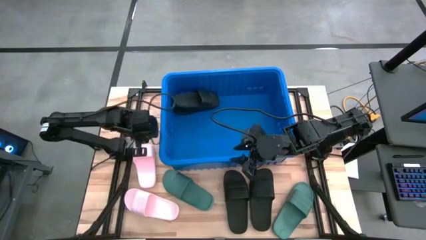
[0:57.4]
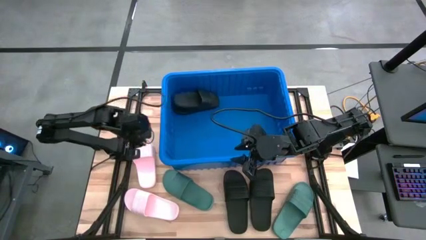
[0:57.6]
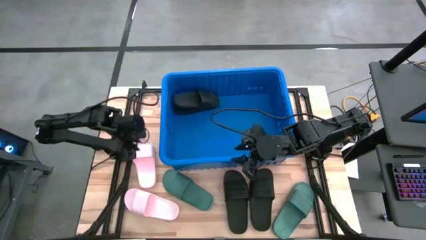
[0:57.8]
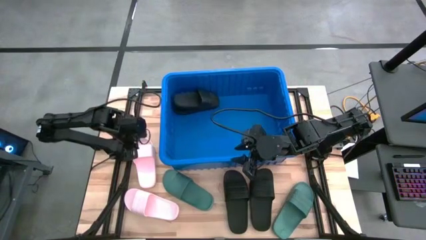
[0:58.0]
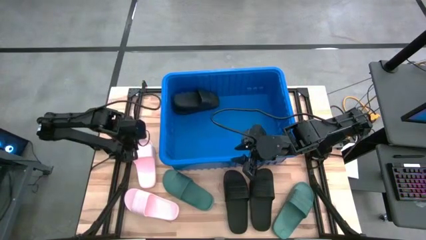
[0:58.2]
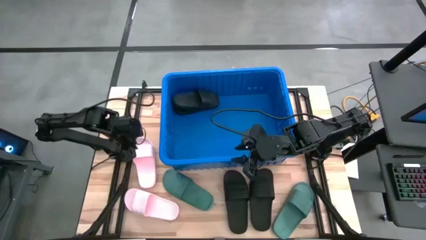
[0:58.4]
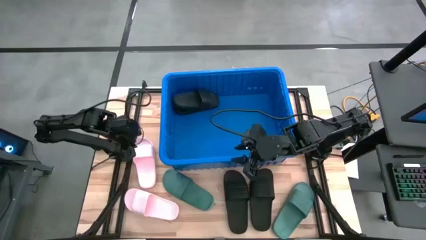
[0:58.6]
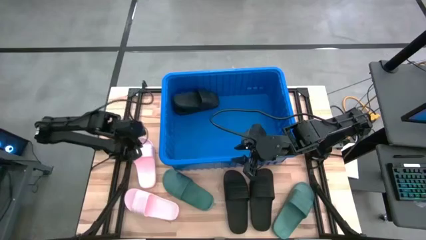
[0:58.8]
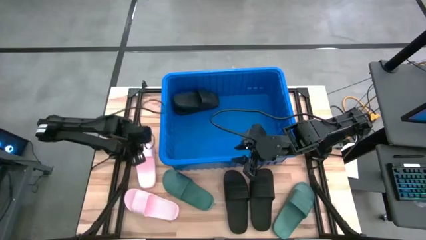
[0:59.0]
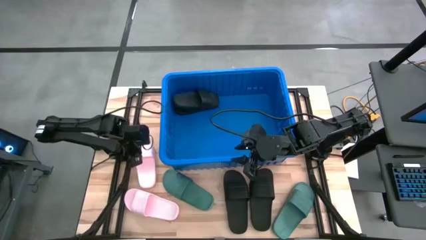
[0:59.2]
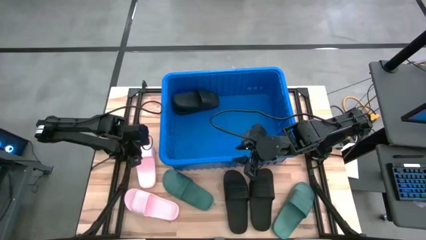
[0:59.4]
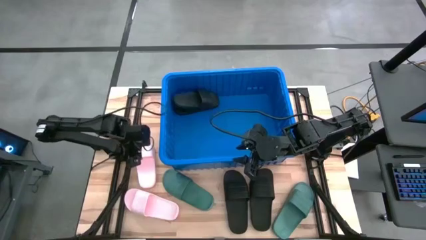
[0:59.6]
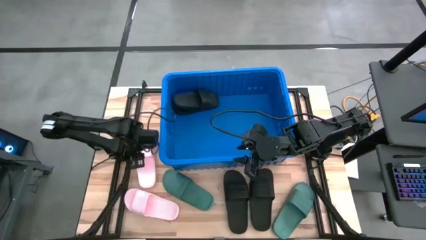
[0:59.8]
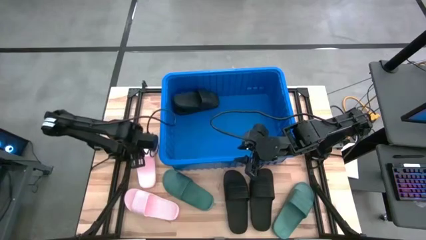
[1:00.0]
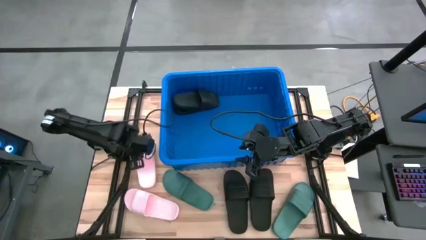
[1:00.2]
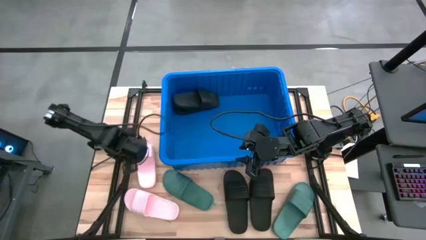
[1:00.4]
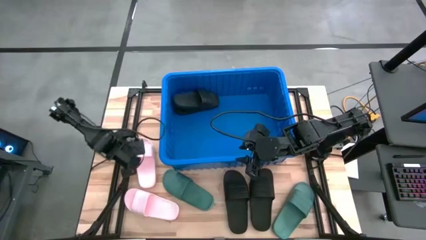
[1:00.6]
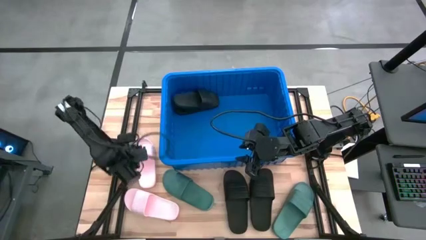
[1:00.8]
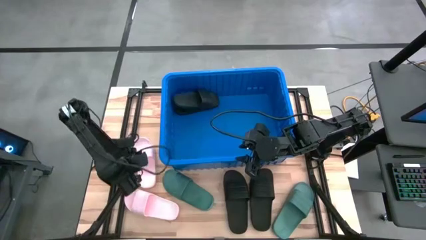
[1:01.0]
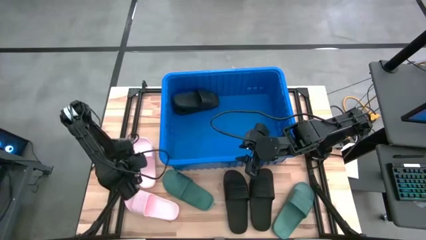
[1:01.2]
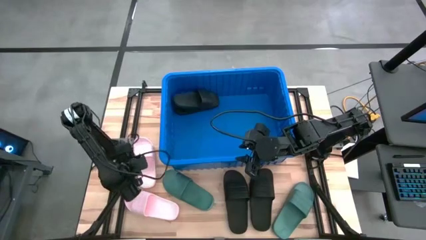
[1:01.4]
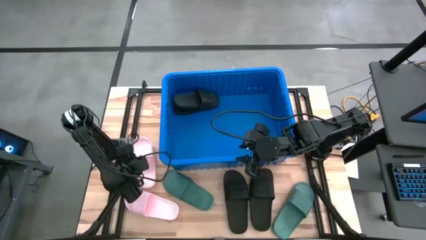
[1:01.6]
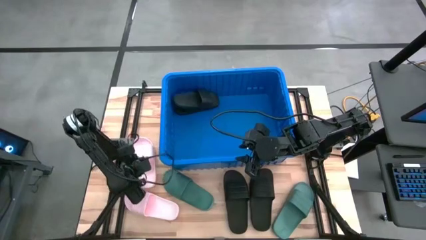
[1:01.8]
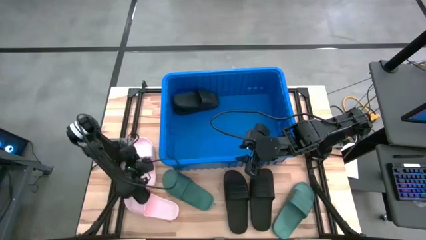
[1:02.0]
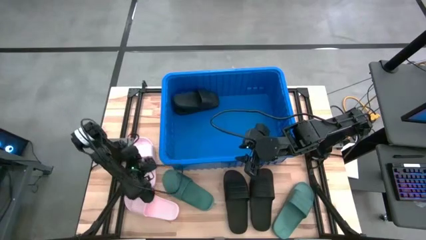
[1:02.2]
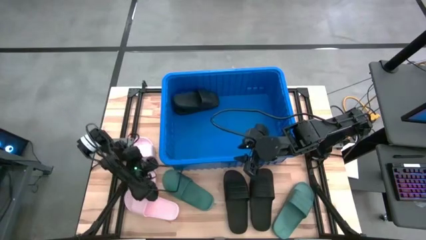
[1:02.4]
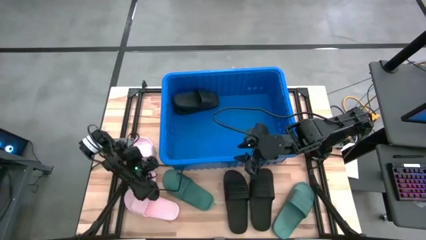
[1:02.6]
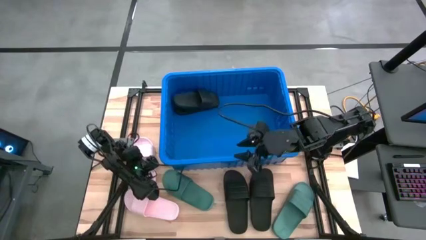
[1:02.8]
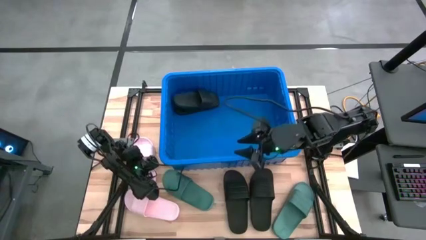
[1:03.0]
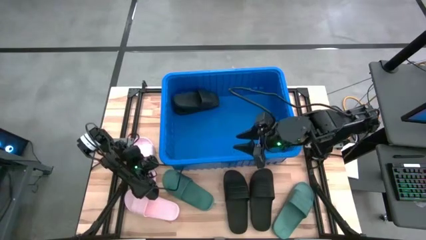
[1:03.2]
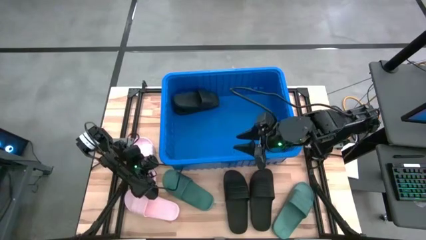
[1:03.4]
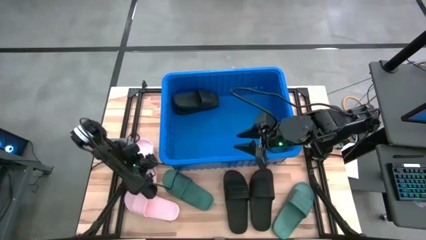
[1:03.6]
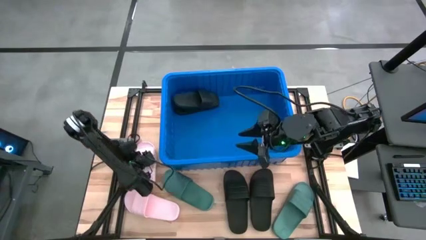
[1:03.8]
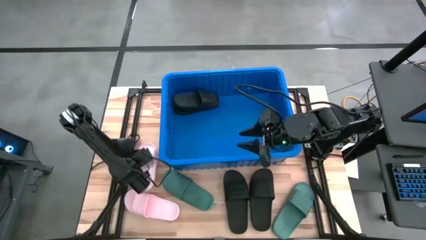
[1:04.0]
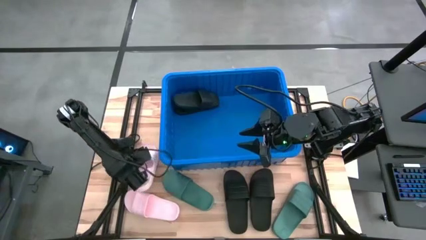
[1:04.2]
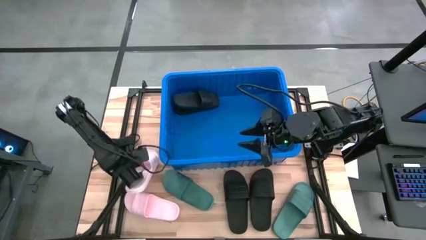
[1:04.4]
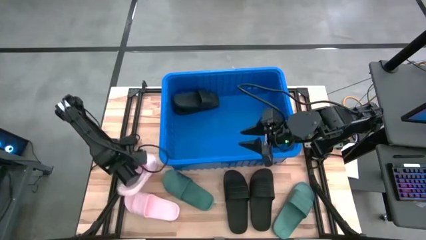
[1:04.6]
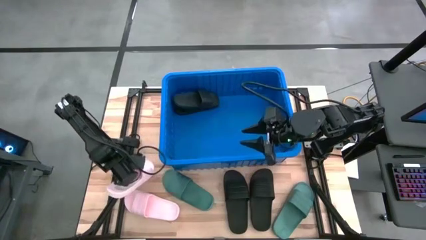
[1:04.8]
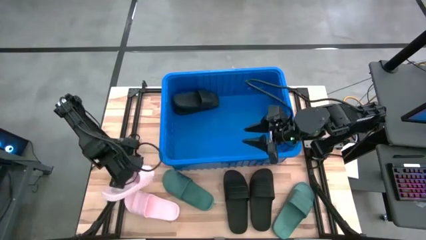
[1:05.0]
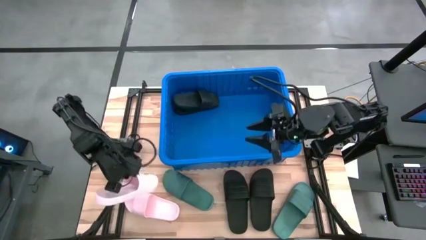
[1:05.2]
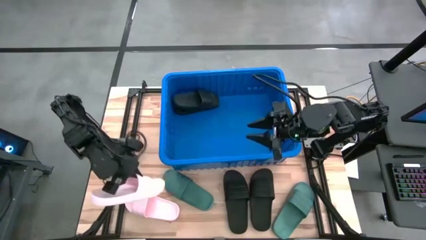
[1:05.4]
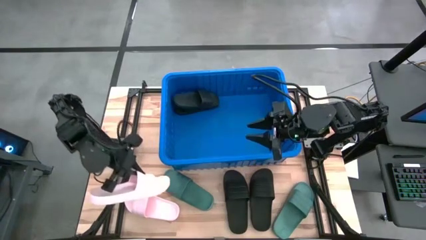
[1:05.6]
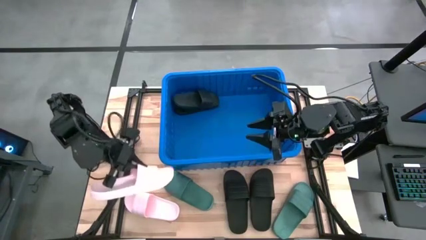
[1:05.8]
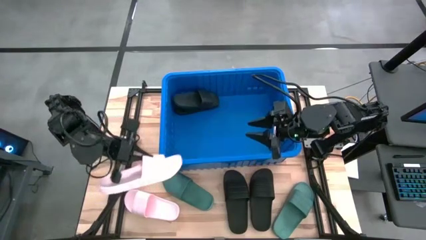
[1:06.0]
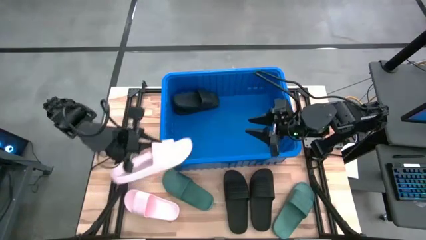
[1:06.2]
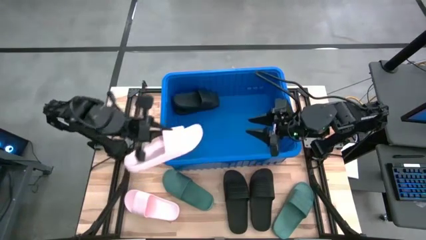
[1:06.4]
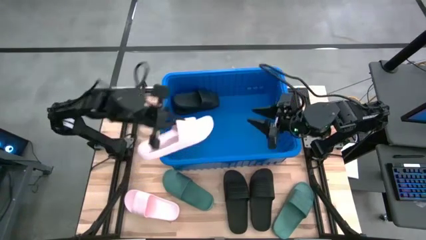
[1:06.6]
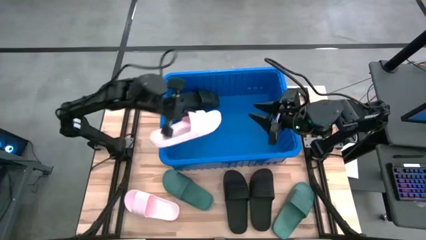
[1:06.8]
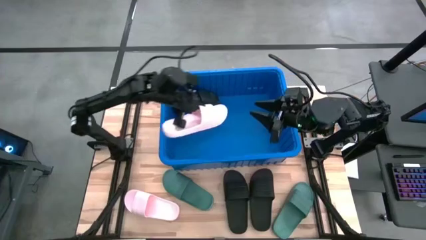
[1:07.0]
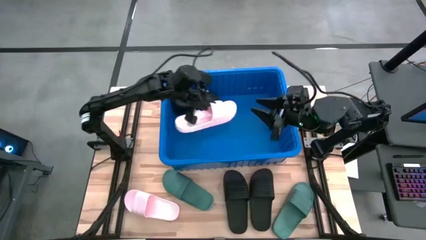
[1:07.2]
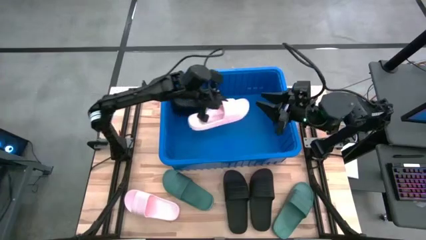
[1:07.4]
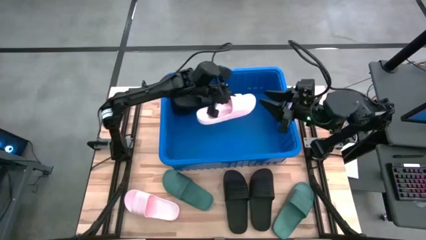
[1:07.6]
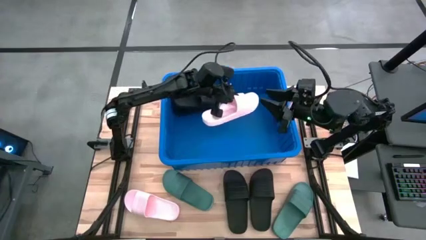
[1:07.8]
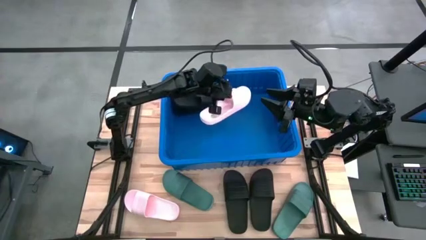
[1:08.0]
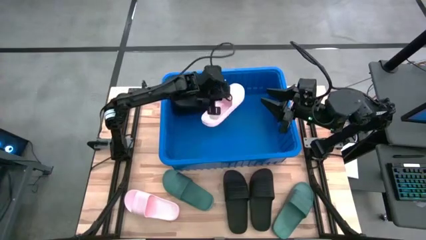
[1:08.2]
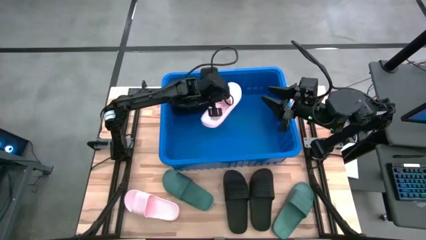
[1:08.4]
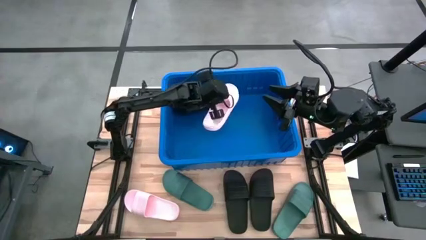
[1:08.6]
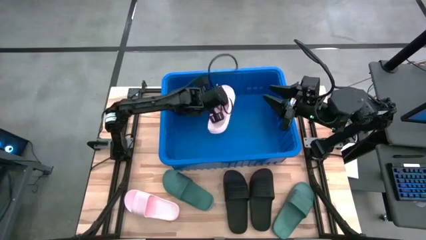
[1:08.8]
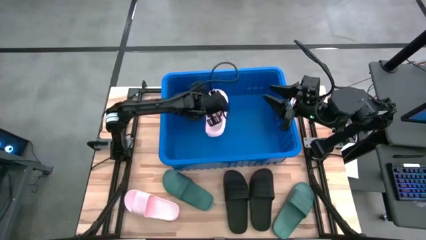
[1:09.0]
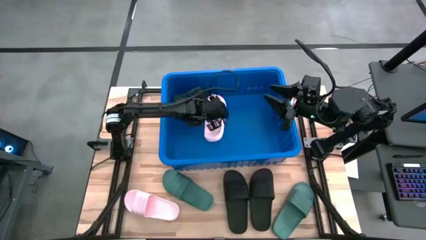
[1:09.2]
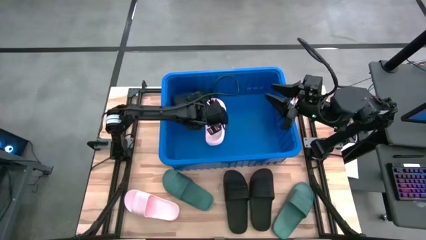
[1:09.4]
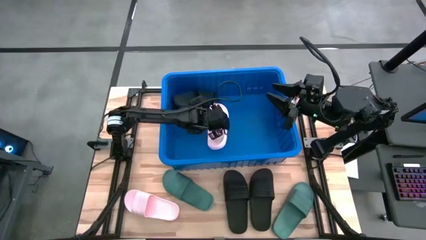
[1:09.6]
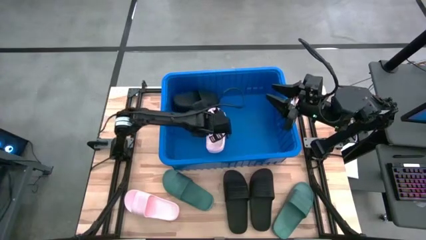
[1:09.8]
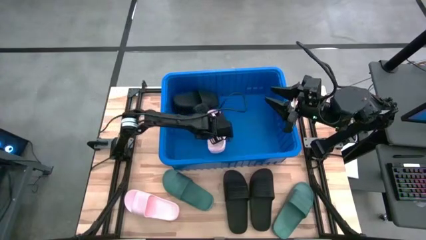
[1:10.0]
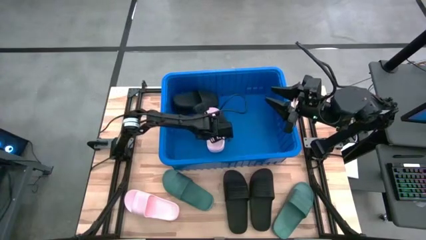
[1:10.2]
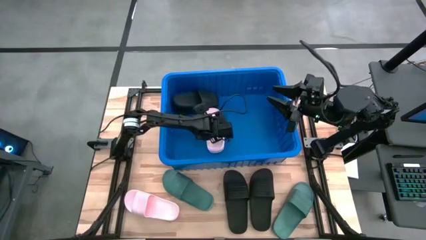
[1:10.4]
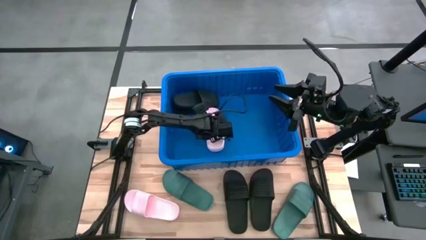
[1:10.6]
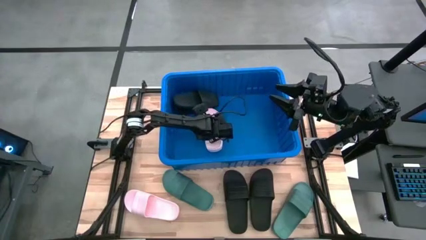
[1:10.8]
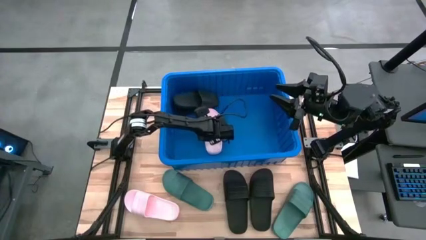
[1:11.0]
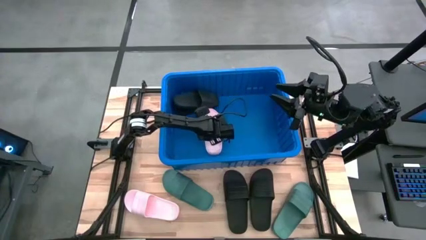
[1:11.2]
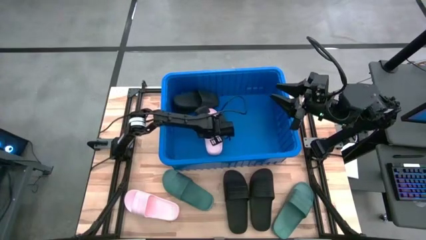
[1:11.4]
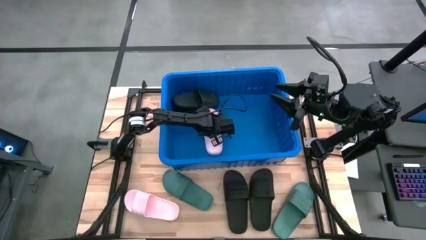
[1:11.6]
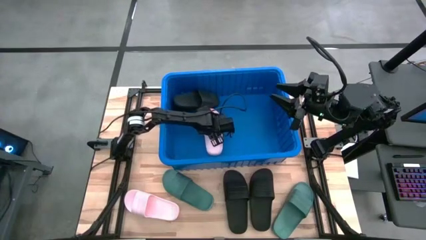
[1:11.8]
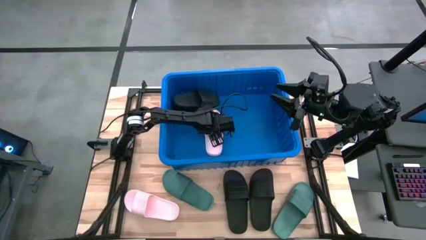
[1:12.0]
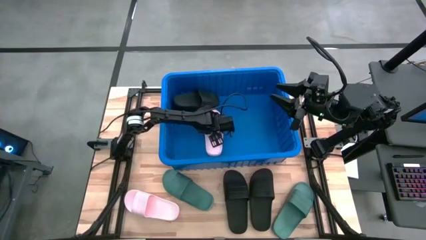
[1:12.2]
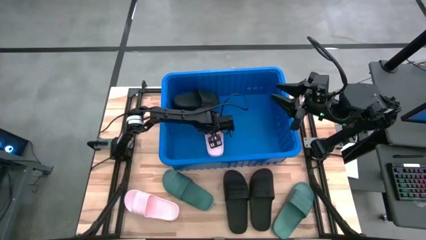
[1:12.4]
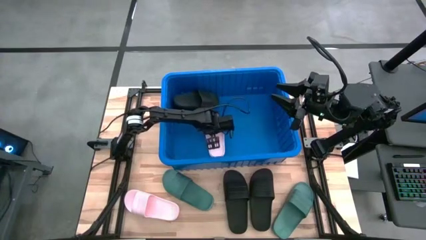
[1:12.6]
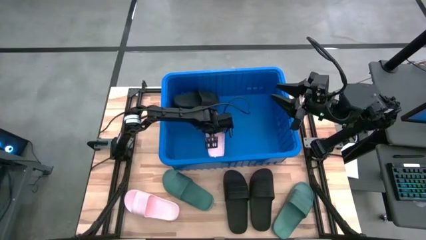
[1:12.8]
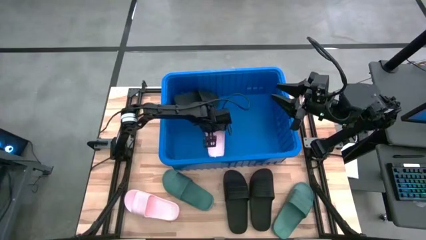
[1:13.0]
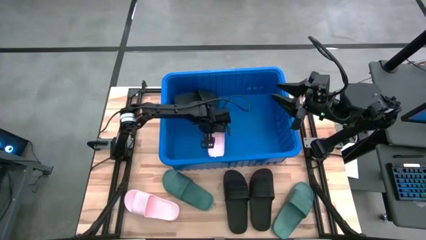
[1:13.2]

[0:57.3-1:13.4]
Task: Pick and place slides into bin
Put the pink slide into the blue container
